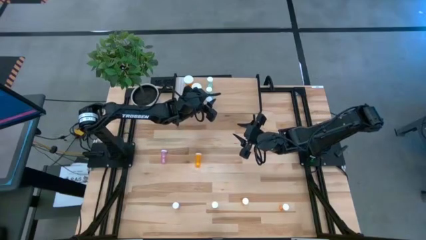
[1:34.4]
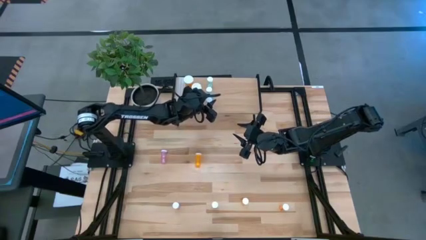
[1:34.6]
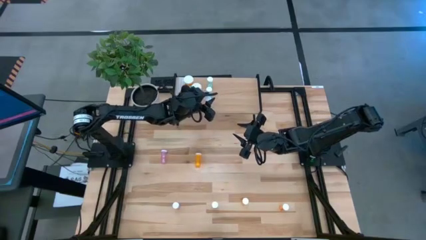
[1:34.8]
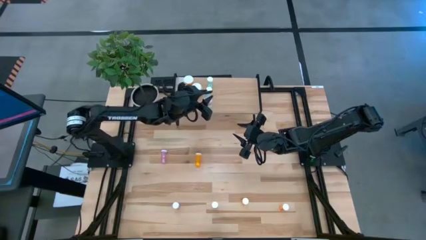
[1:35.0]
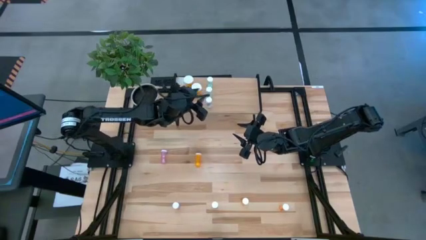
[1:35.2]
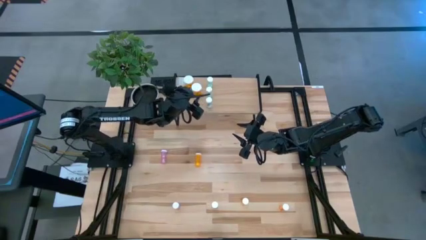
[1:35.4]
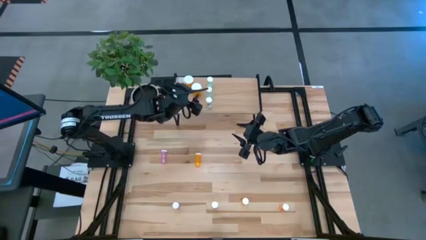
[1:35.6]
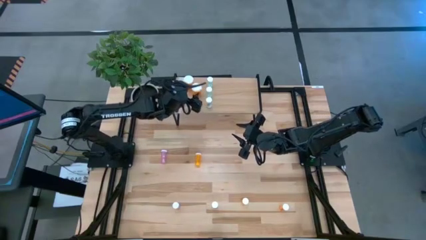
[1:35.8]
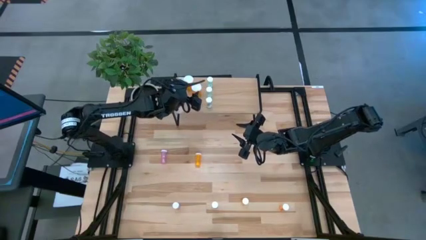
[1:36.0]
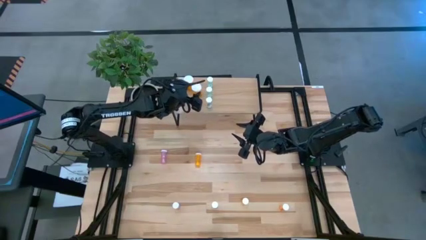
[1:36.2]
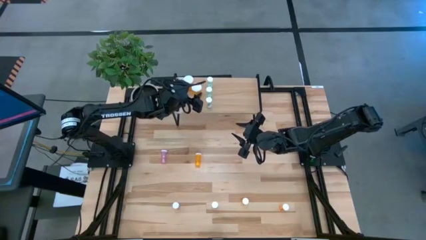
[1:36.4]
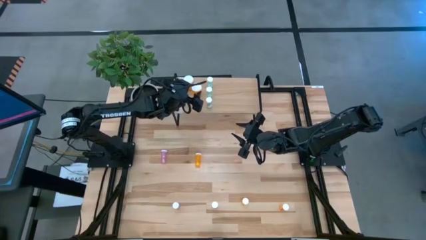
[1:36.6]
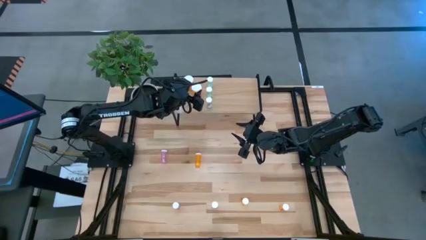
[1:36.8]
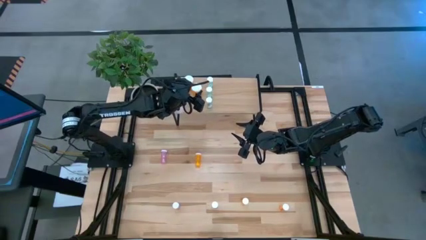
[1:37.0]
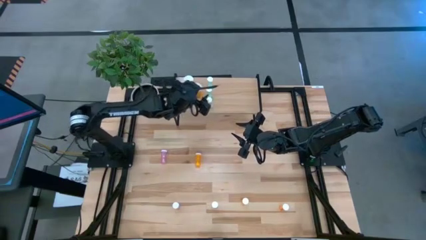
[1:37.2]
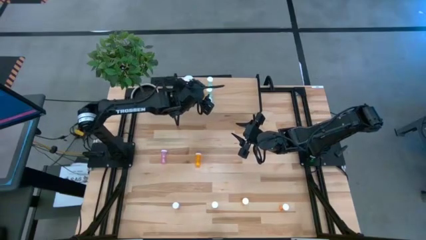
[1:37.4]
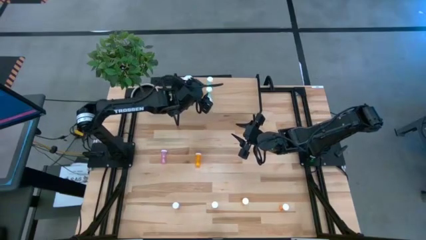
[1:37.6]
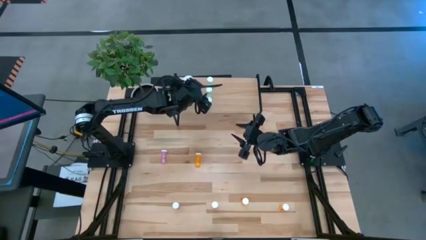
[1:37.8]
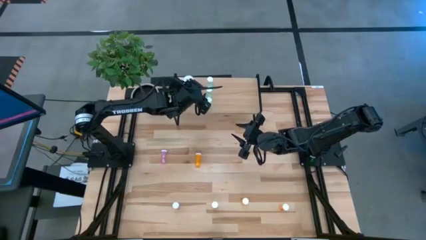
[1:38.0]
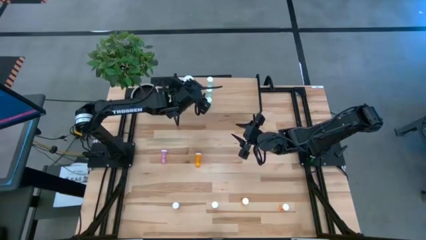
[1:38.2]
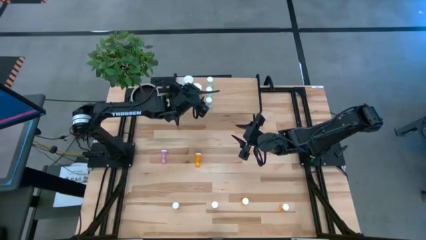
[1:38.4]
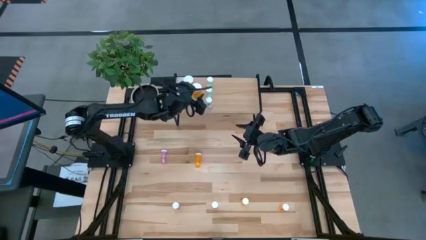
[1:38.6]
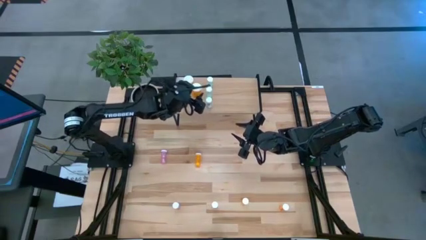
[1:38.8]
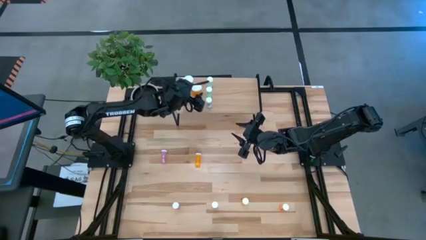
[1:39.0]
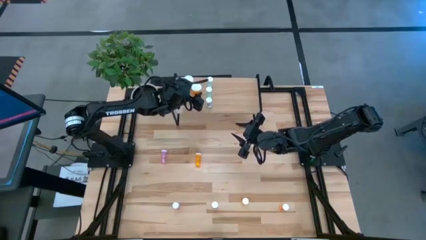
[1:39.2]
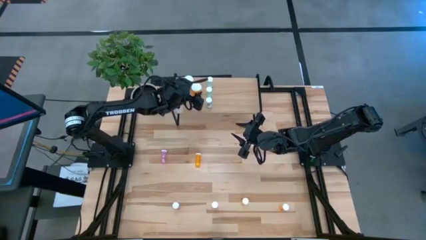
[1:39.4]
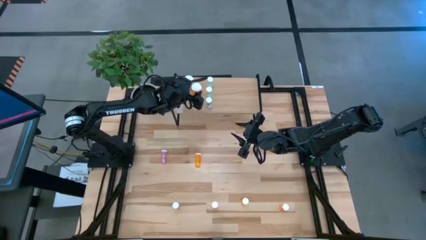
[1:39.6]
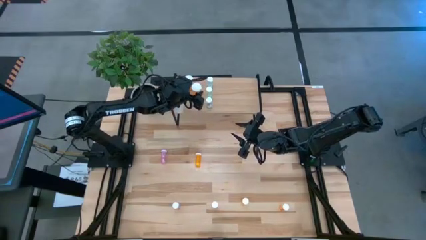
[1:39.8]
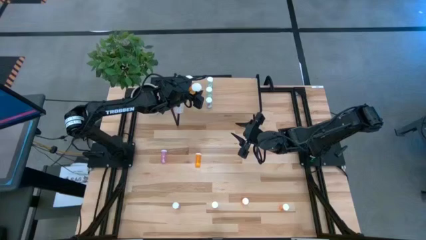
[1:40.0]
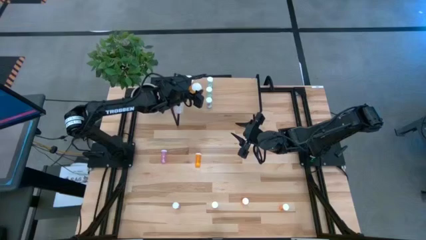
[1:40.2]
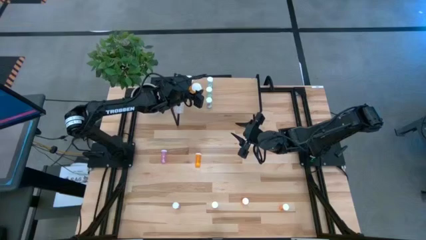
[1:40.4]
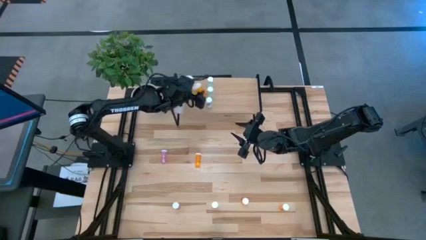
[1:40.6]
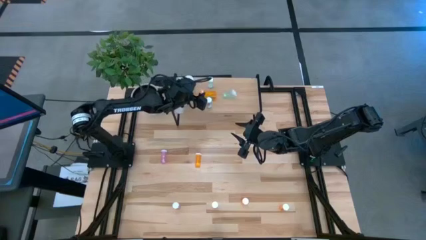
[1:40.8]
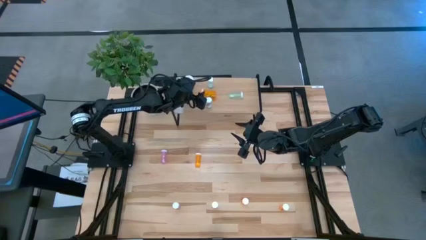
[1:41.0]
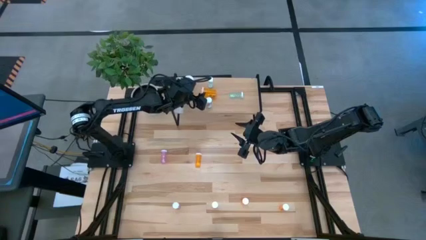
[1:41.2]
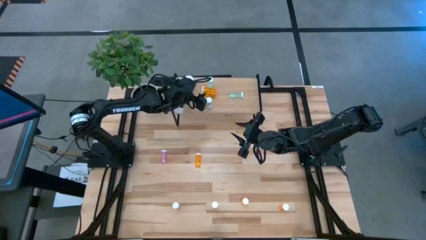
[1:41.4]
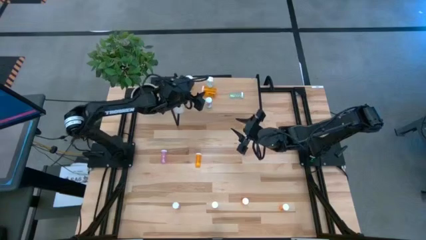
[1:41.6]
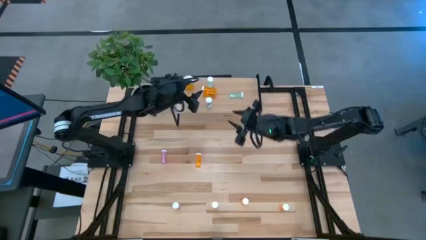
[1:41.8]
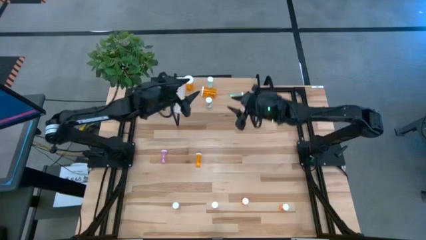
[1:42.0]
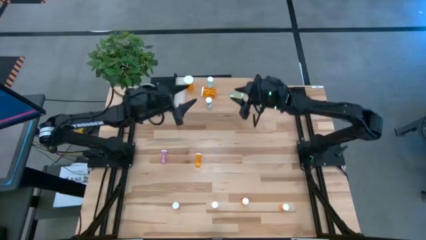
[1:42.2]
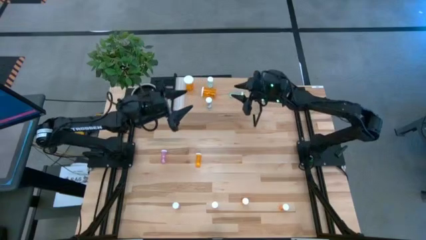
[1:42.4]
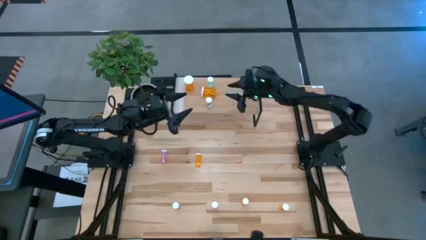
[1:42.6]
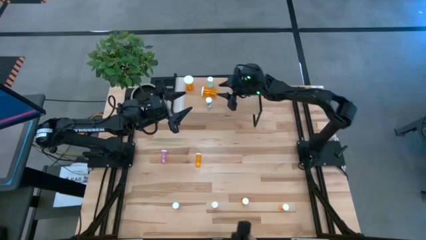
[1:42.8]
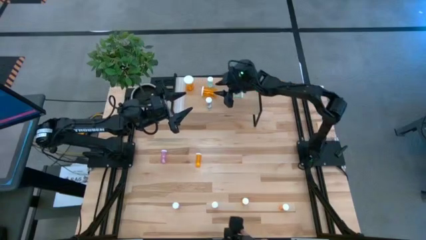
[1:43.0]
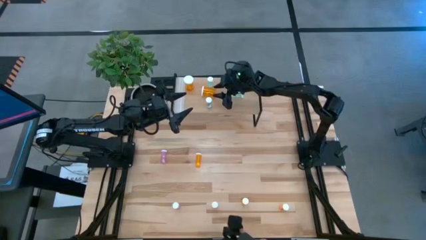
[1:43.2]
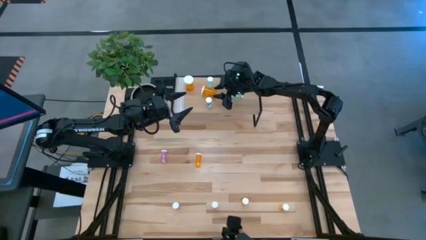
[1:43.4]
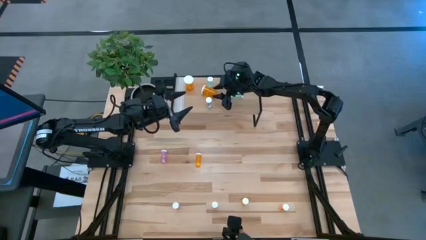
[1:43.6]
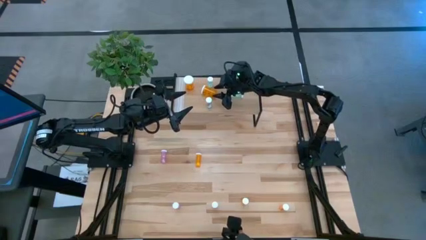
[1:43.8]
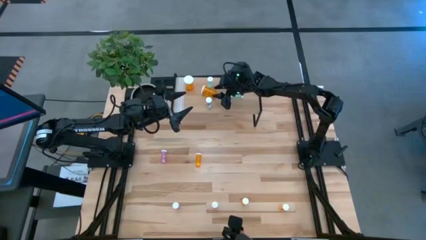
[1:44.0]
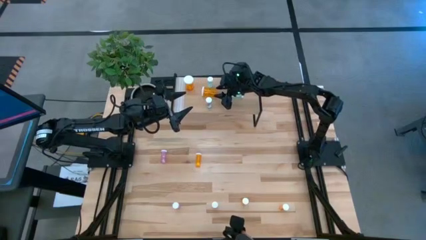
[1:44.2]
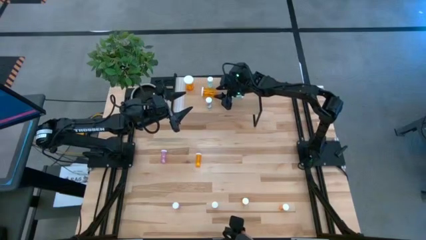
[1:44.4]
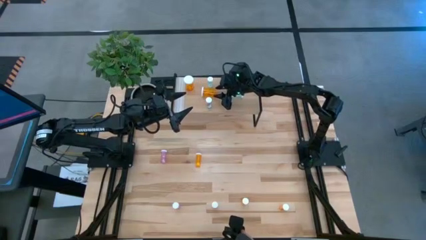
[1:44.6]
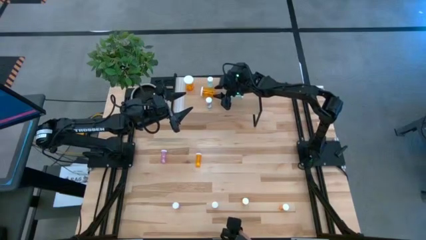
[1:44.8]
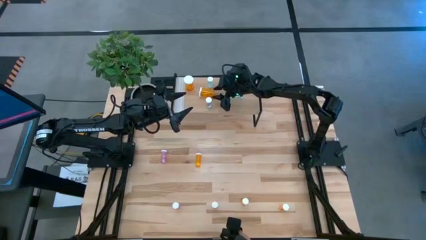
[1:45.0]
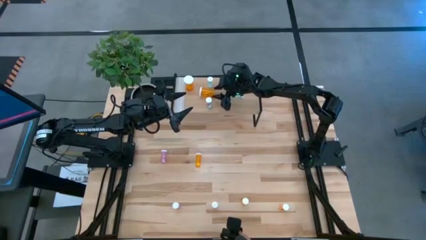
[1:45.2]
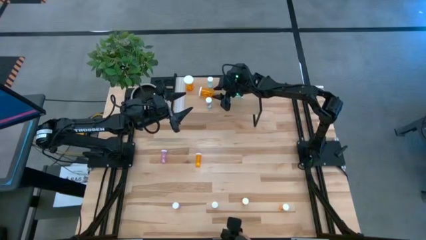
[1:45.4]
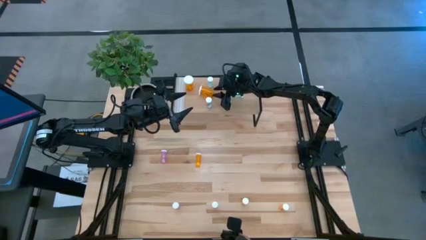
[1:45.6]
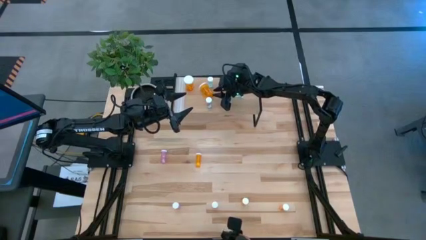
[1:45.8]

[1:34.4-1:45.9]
Task: Pick and place medicine bottles onto shelf by color
Adjust the large orange pill bottle on the shelf

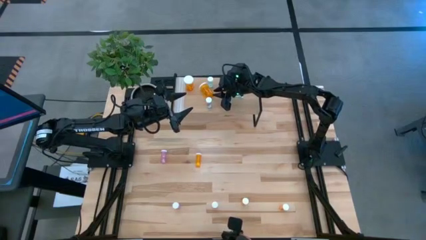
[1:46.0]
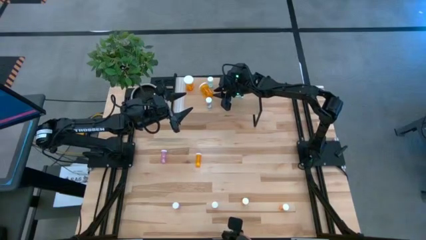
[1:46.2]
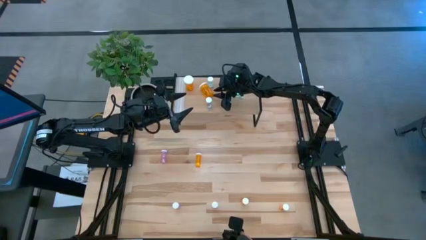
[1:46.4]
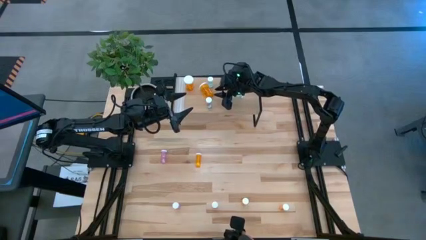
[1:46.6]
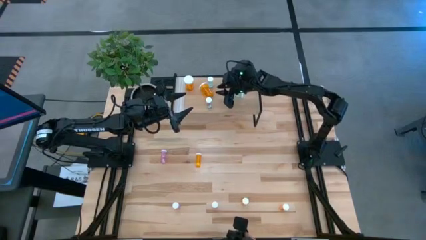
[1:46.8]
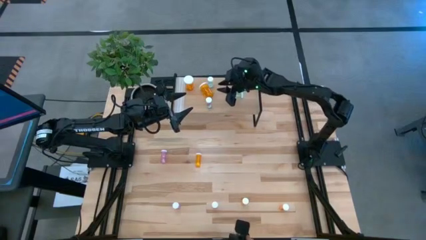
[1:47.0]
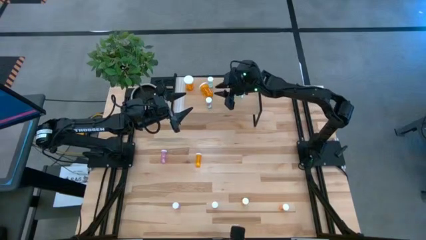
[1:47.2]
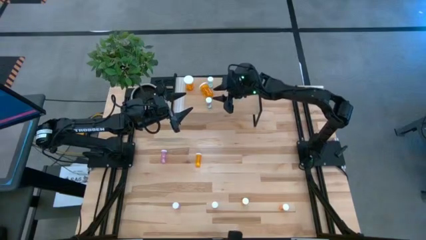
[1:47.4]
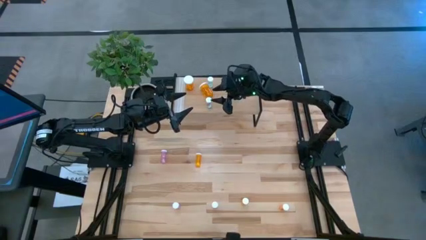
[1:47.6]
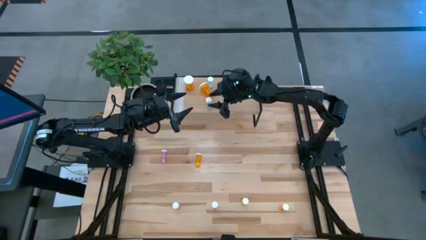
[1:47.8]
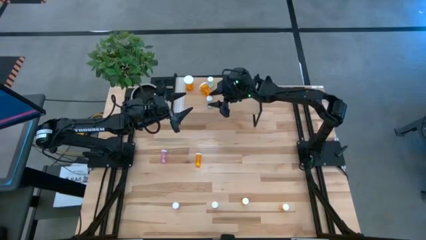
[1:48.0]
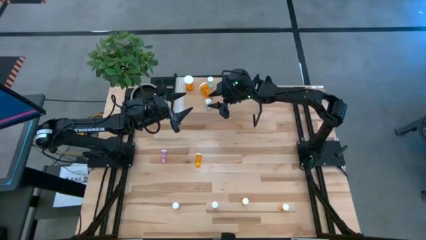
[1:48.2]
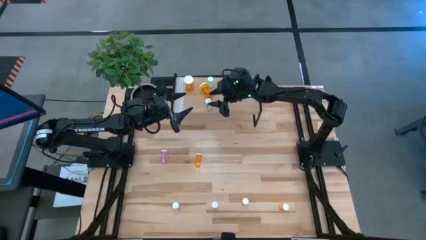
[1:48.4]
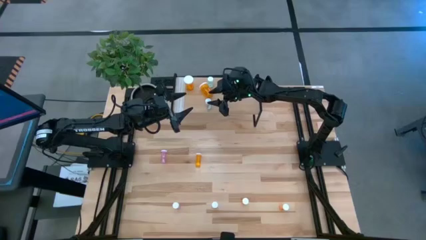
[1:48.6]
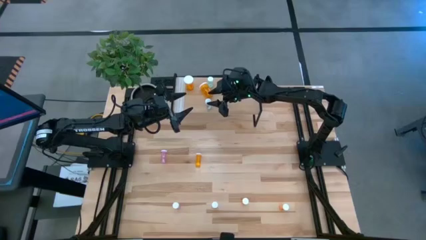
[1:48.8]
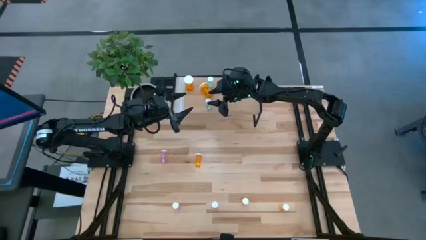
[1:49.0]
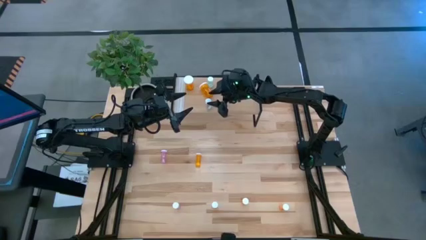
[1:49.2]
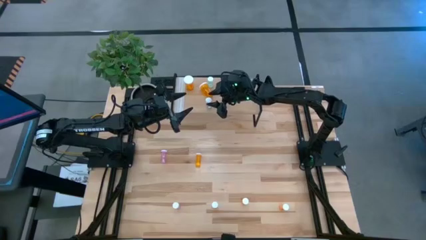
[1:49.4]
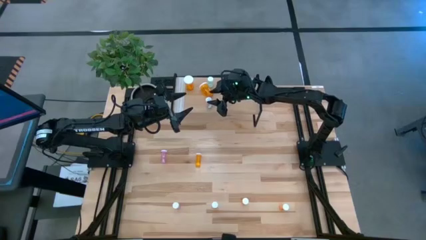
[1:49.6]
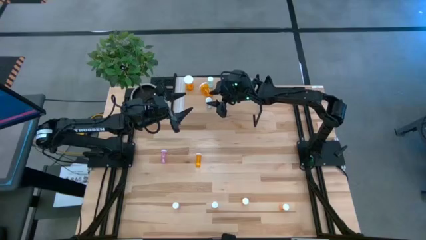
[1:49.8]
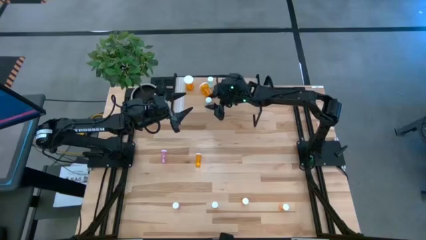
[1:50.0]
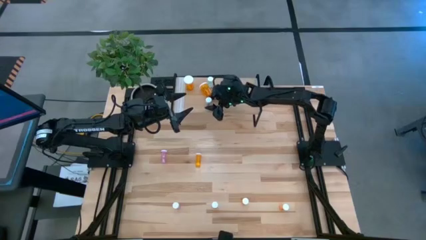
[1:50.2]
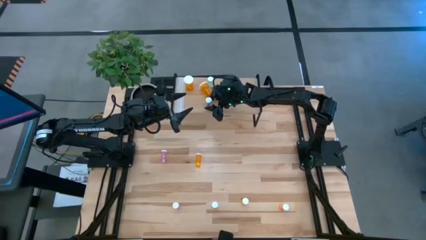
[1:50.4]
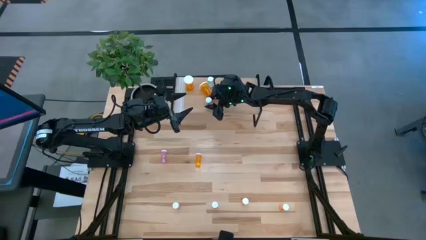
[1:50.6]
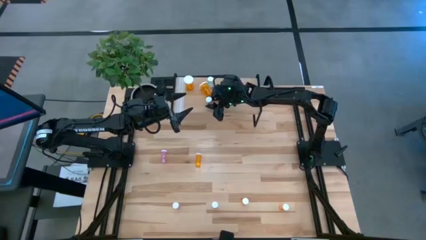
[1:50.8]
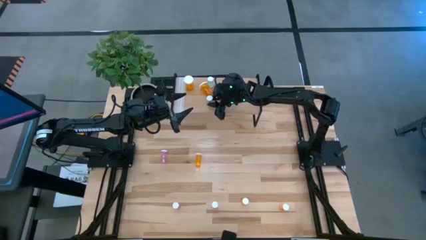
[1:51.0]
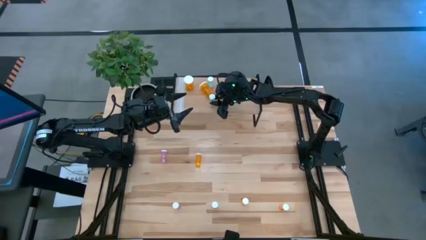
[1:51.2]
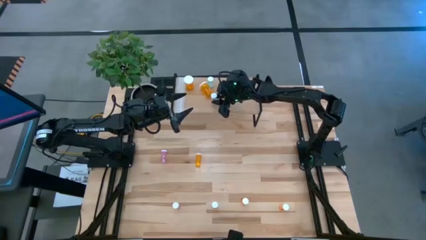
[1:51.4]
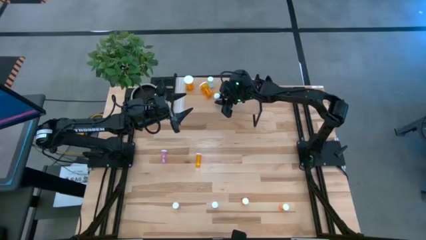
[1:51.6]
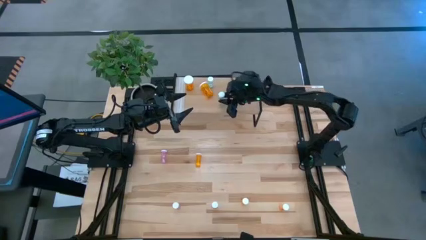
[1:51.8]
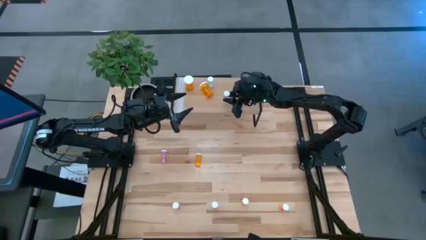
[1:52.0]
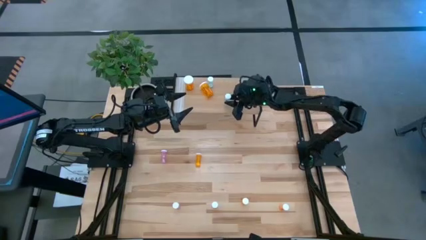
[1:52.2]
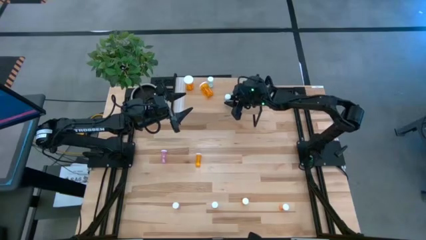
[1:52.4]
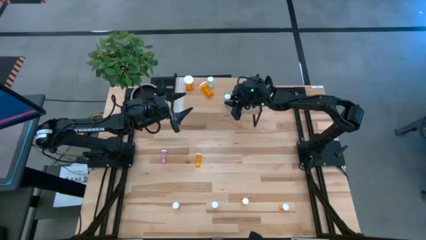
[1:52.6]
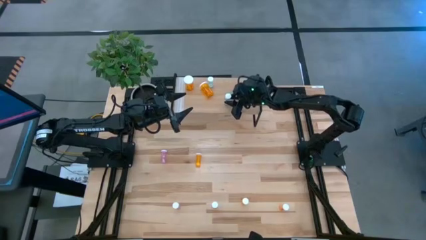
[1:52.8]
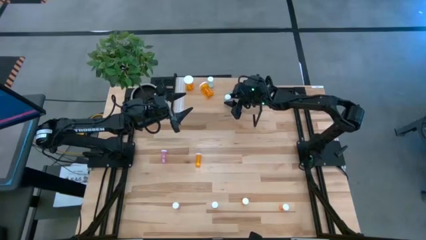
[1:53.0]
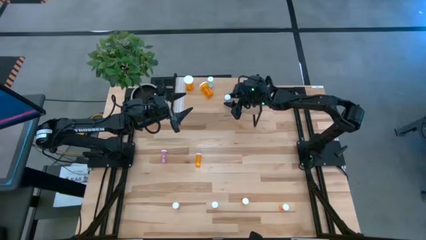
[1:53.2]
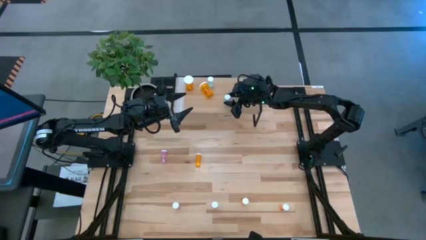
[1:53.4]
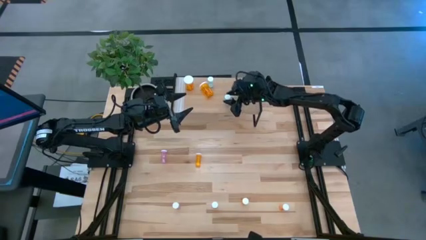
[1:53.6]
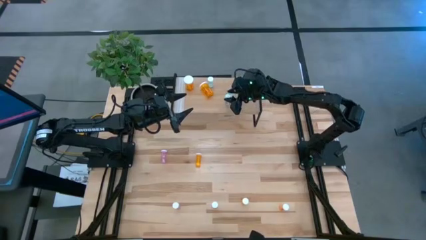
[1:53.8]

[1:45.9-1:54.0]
Adjust the green pill bottle on the shelf
